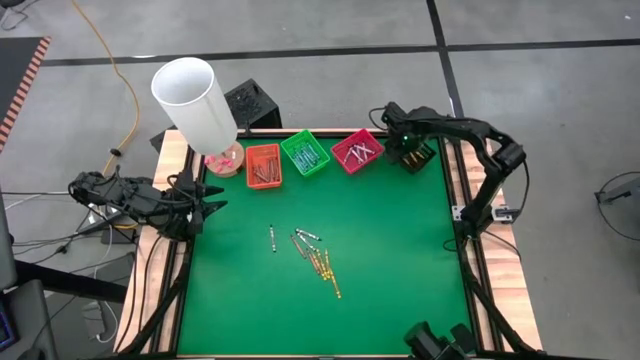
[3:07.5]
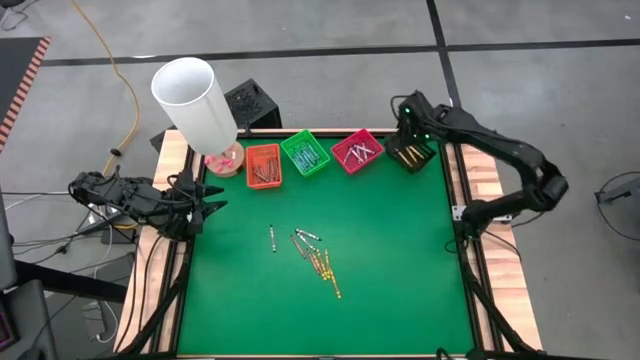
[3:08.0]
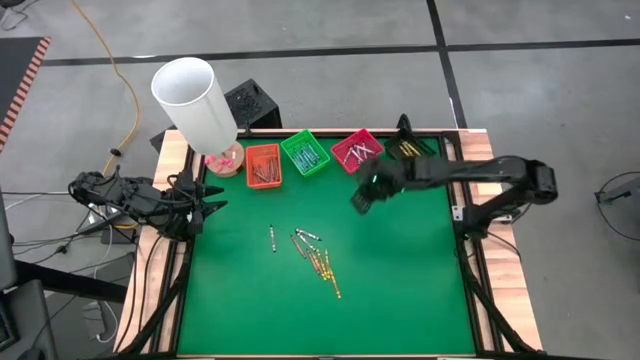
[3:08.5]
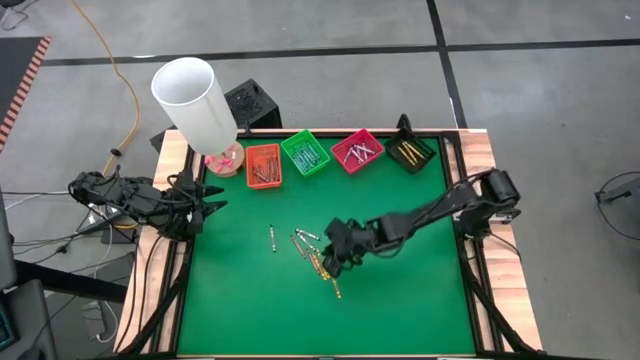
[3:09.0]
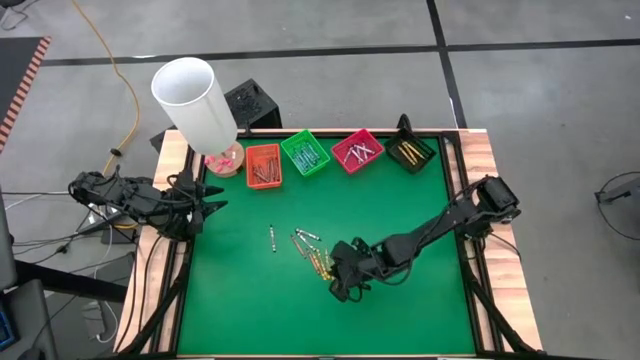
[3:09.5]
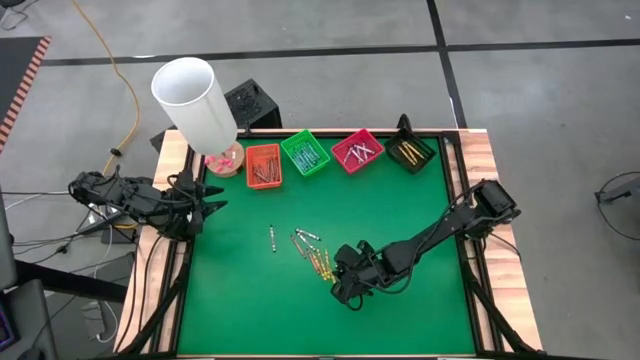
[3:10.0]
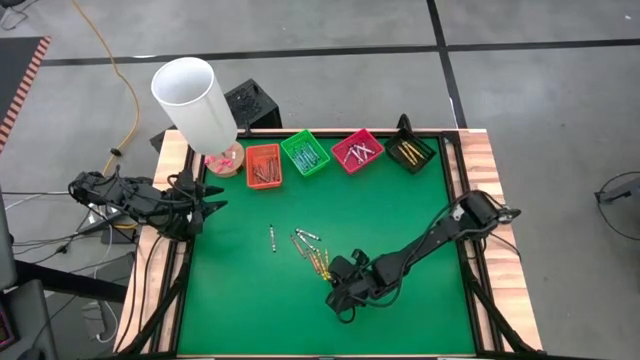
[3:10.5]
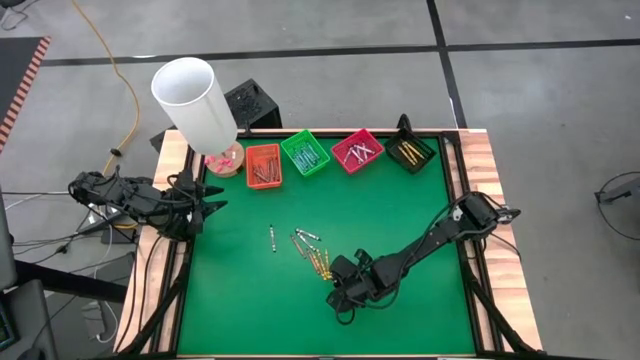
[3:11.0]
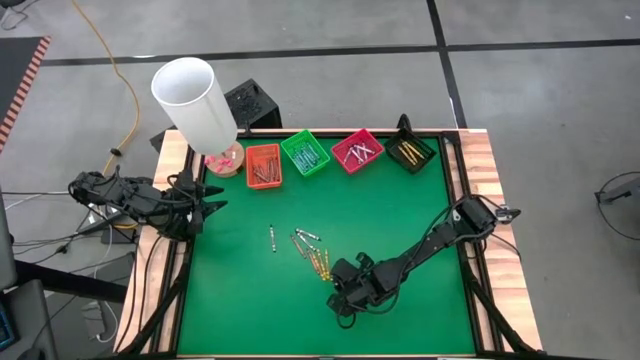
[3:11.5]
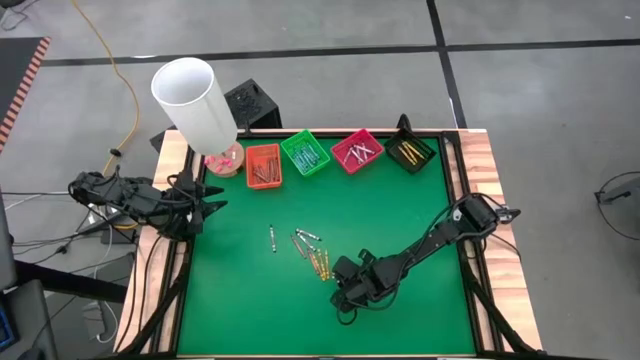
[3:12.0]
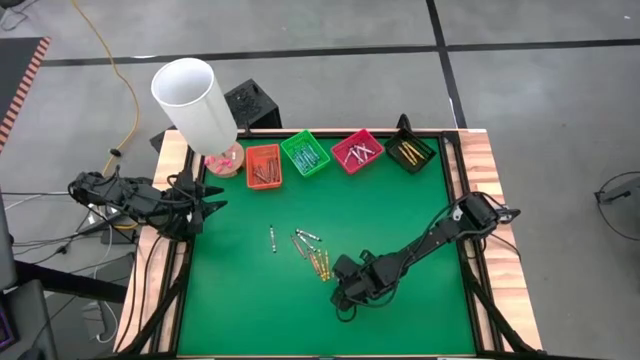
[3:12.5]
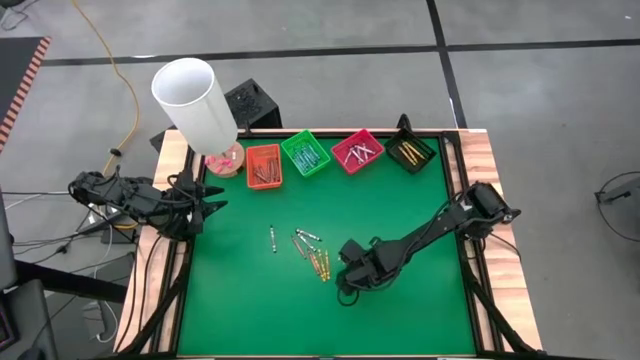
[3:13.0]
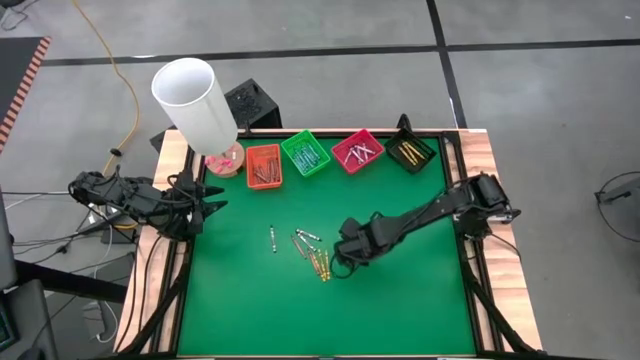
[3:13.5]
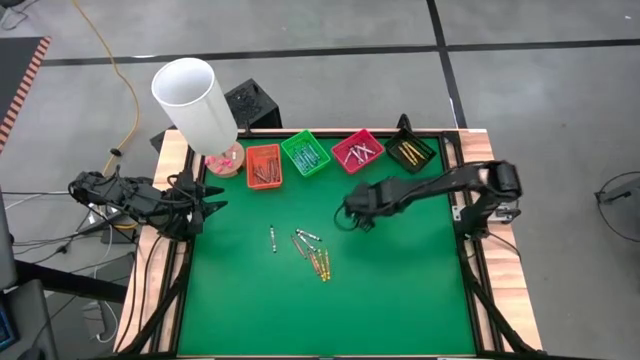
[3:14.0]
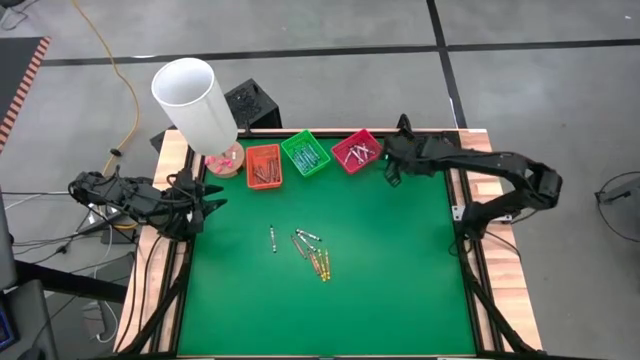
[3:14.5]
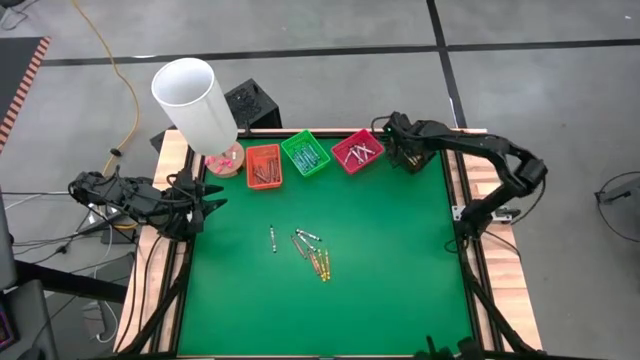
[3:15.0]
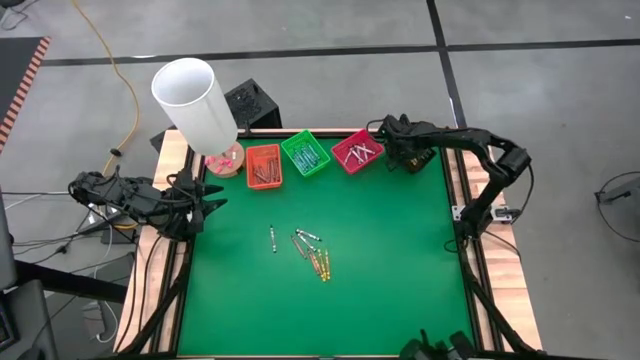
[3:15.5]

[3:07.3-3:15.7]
Task: Sort crayons
Put the yellow/green crayon into the black bin

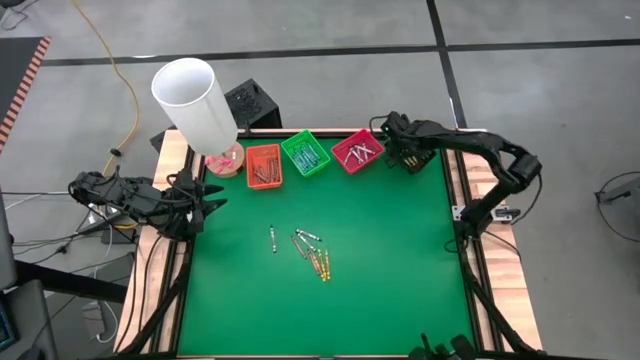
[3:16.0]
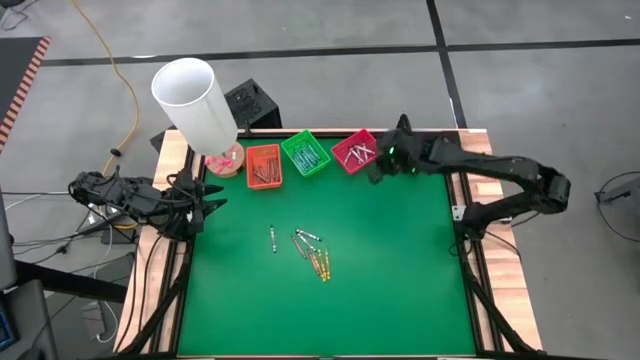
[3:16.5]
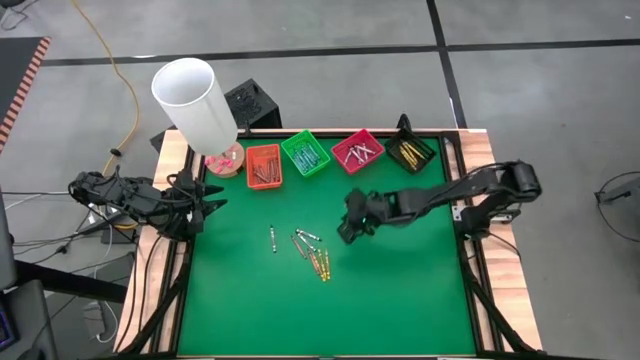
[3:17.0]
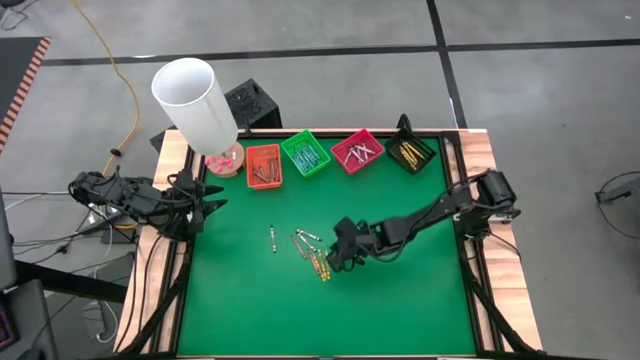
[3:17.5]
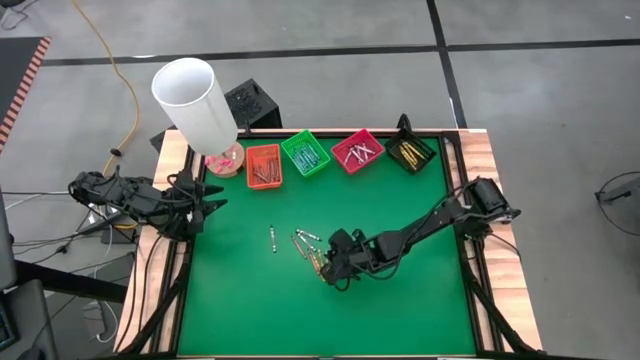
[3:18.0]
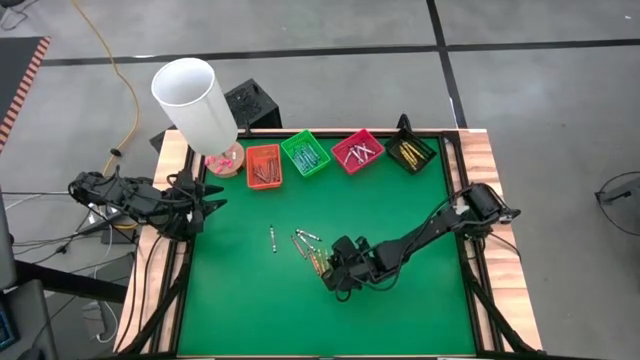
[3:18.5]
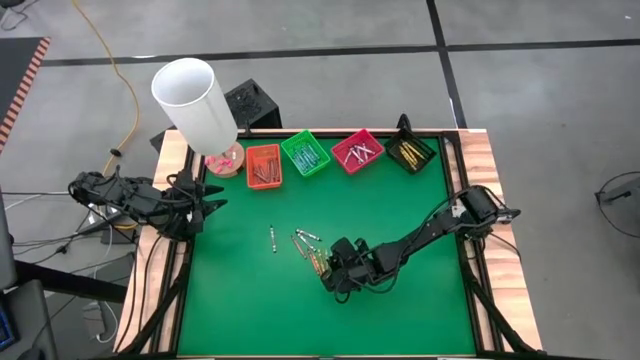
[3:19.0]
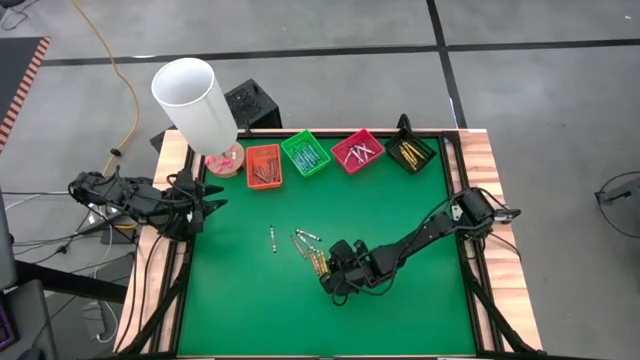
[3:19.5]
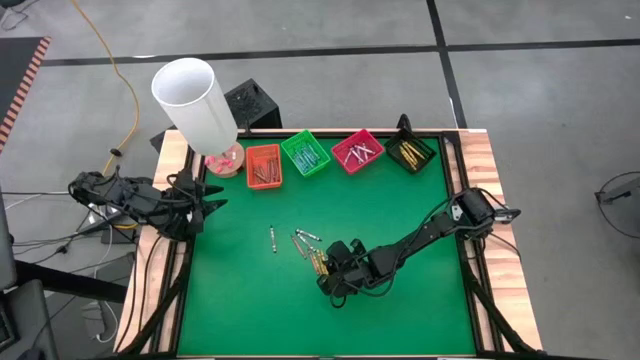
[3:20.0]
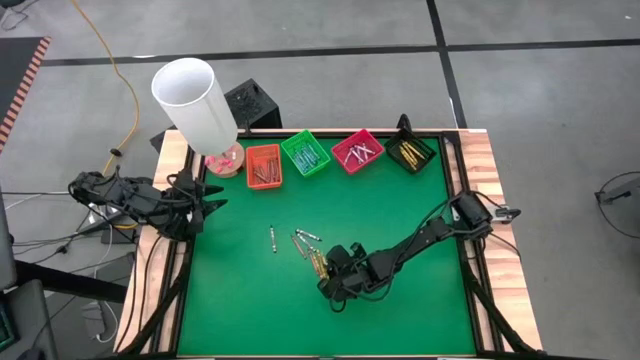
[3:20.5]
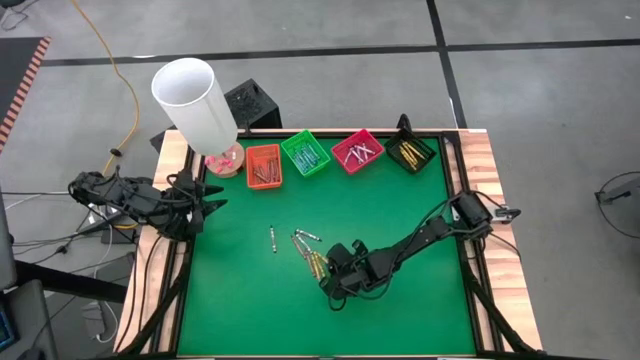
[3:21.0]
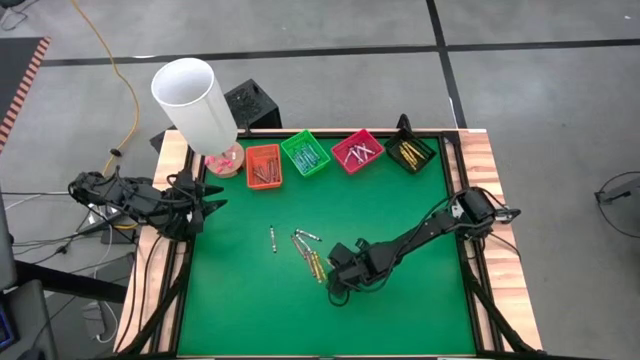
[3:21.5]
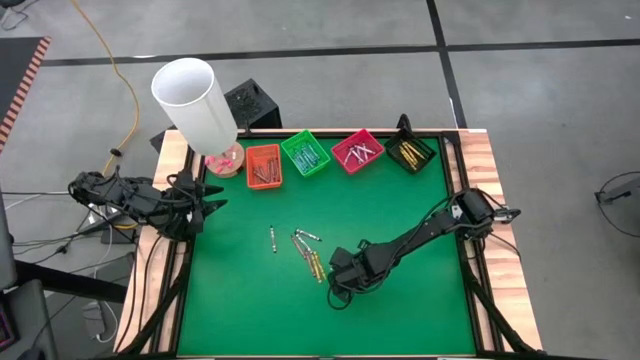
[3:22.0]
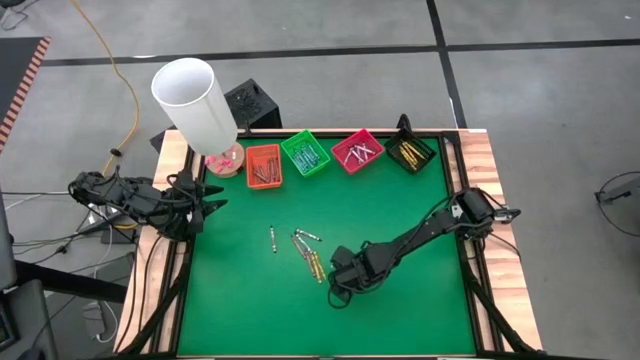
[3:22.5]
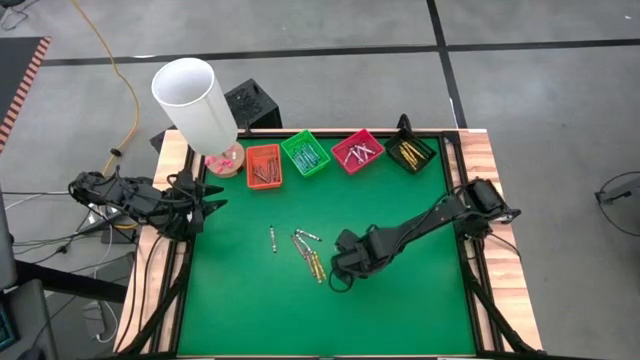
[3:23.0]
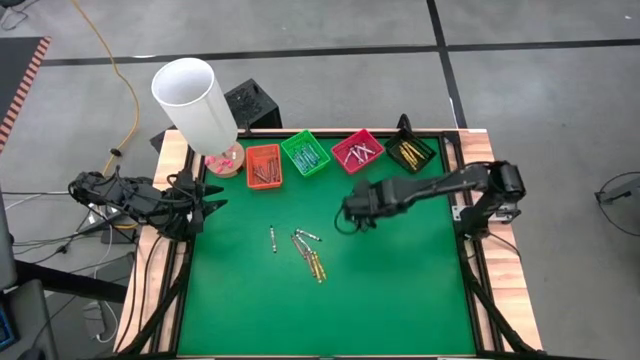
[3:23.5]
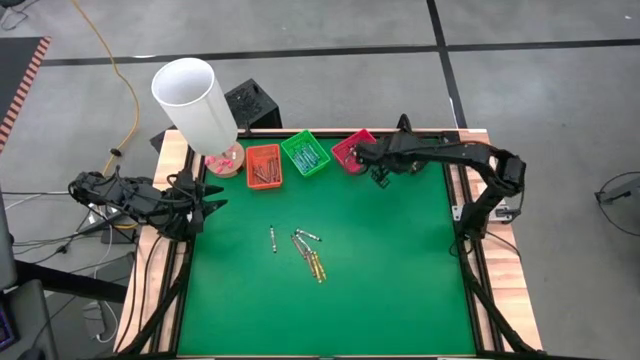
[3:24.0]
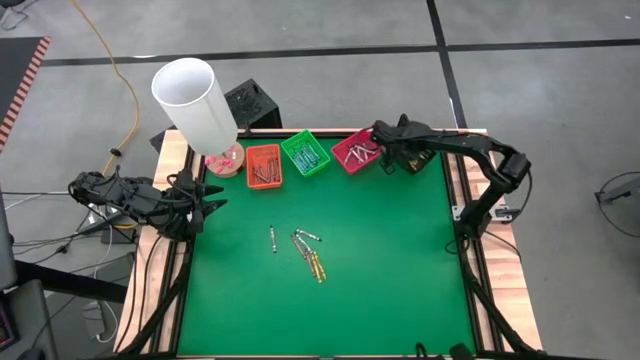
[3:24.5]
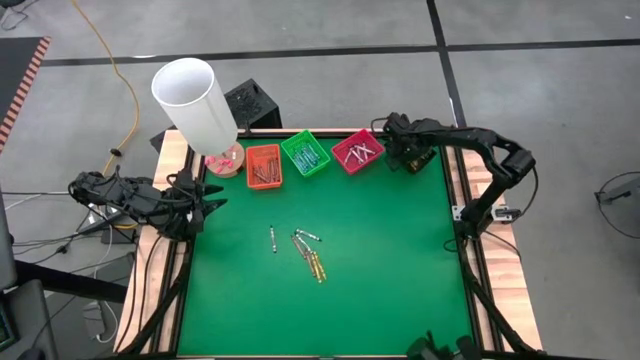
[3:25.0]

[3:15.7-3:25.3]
Put the yellow/green crayon into the black bin

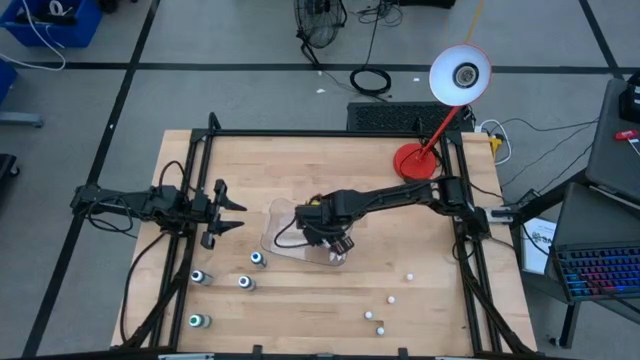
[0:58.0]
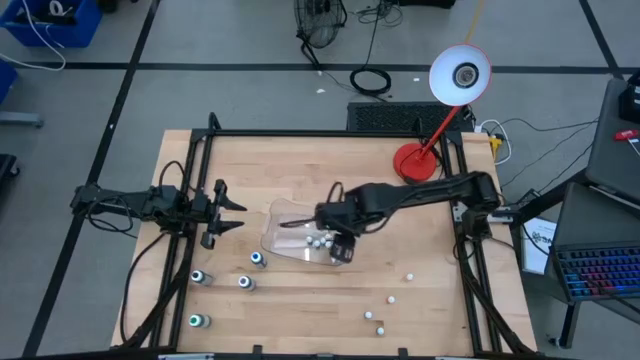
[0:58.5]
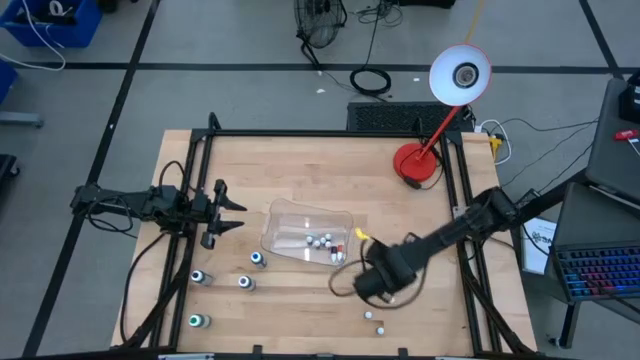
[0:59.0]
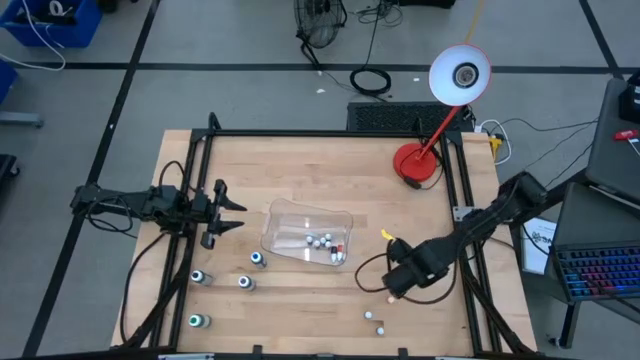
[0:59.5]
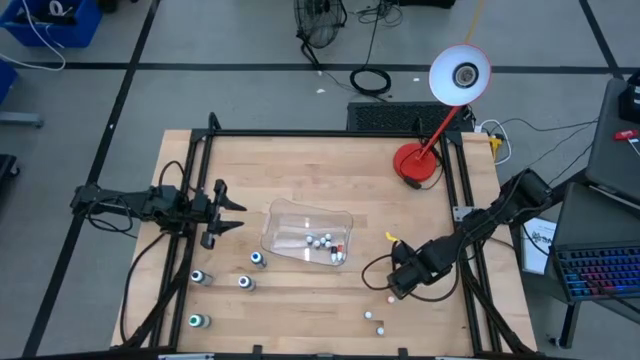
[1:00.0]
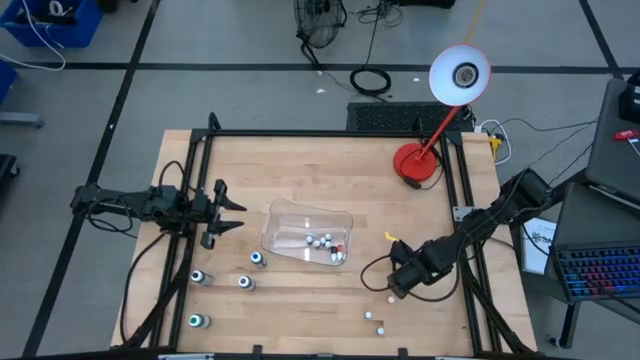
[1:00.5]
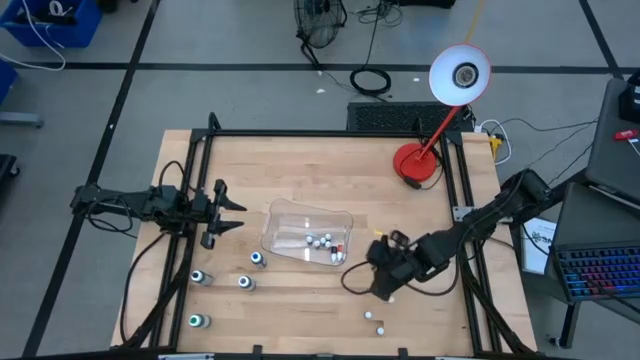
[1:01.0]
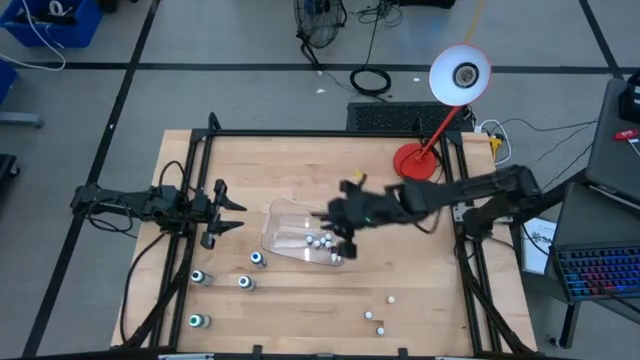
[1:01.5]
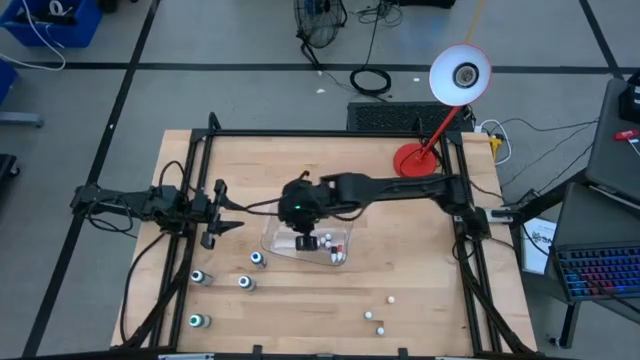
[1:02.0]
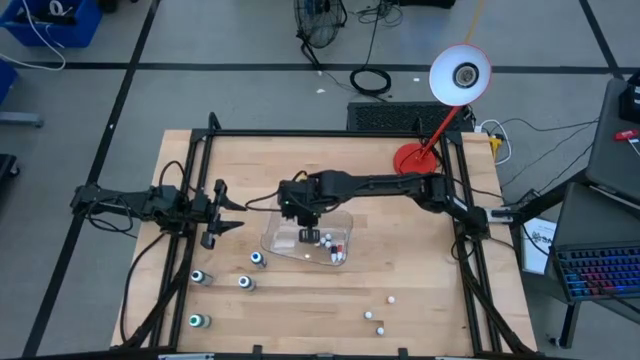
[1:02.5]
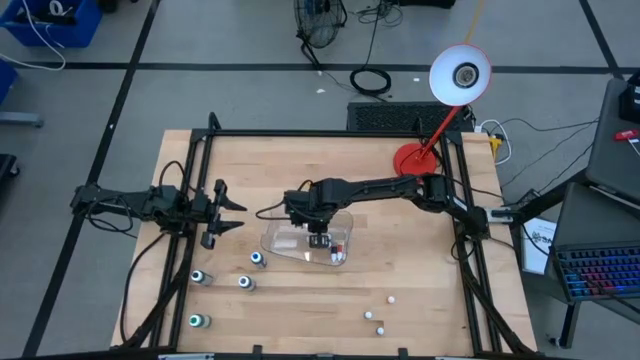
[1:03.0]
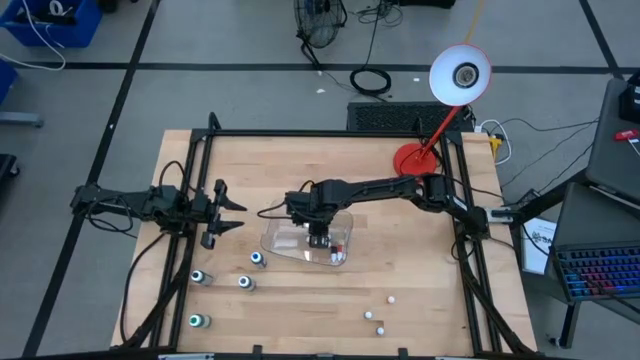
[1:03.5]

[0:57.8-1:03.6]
Task: Pick & Place food coloring
Put the small orange food coloring bottle into the transparent bin
